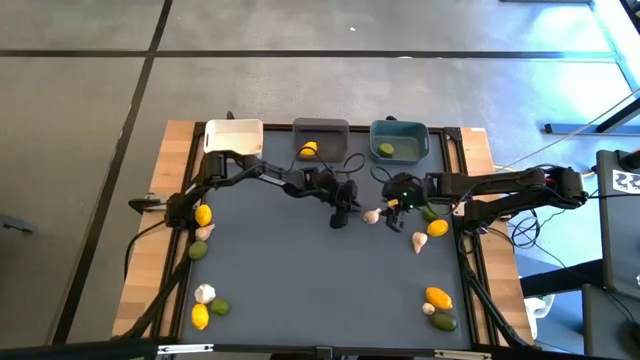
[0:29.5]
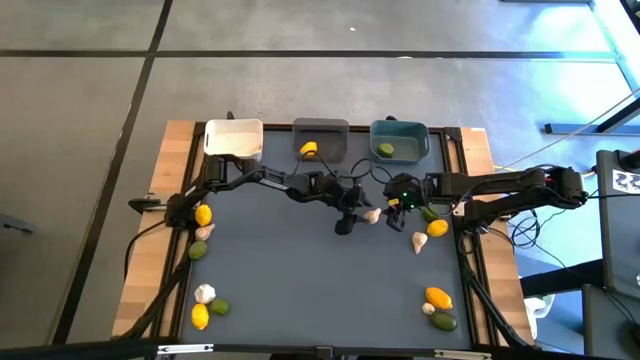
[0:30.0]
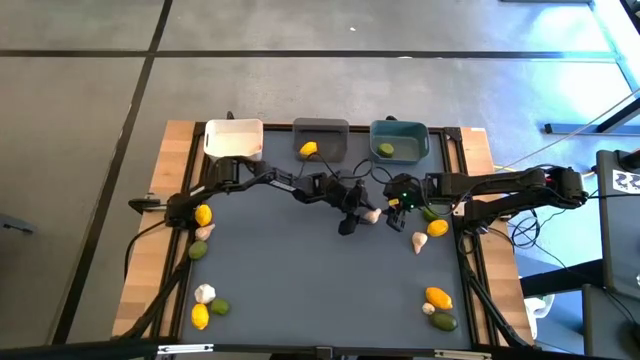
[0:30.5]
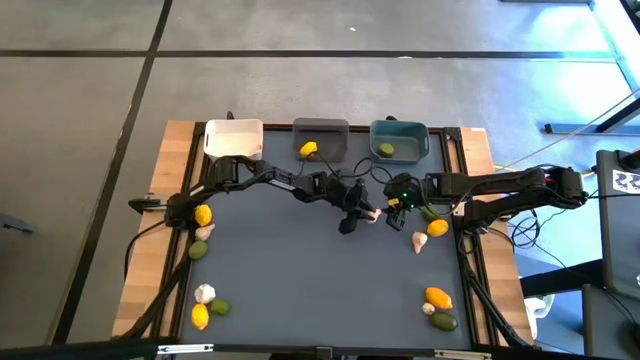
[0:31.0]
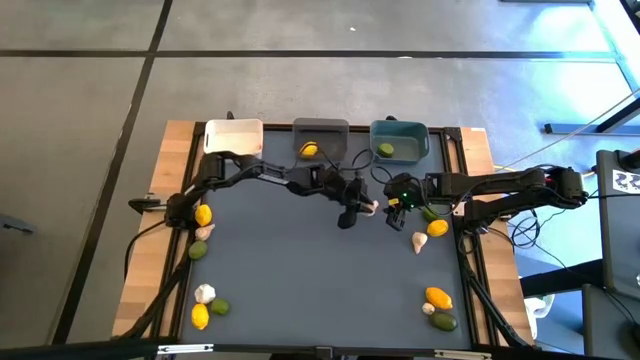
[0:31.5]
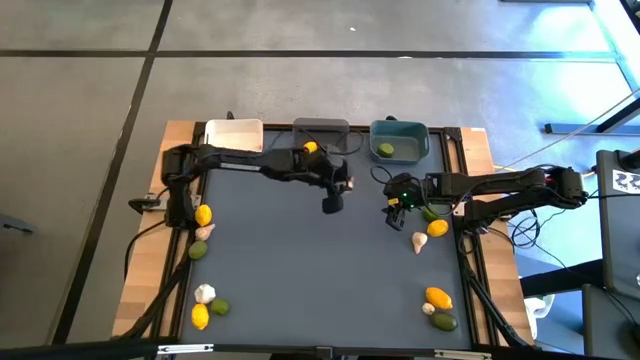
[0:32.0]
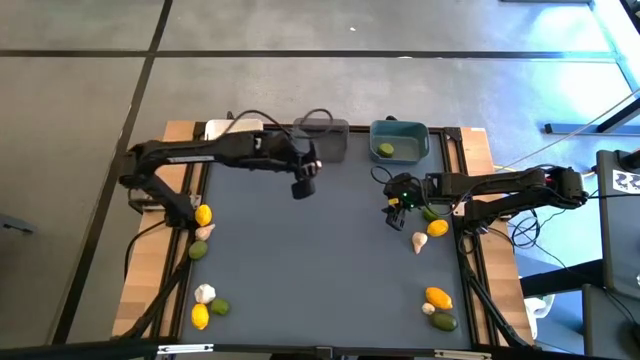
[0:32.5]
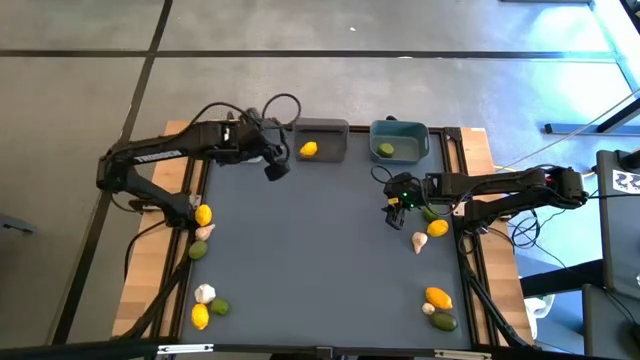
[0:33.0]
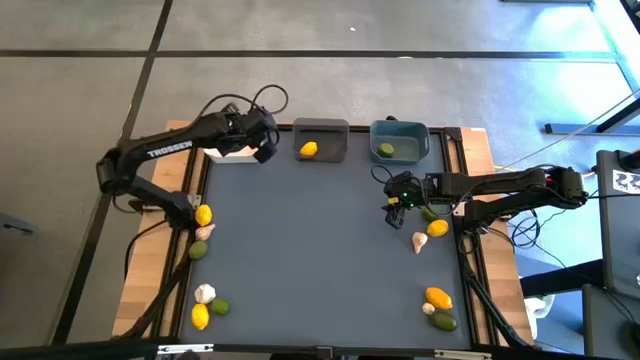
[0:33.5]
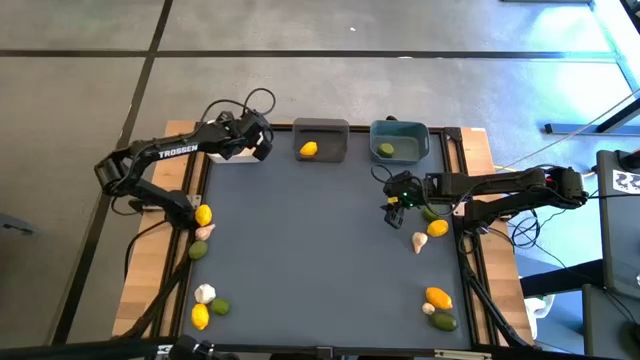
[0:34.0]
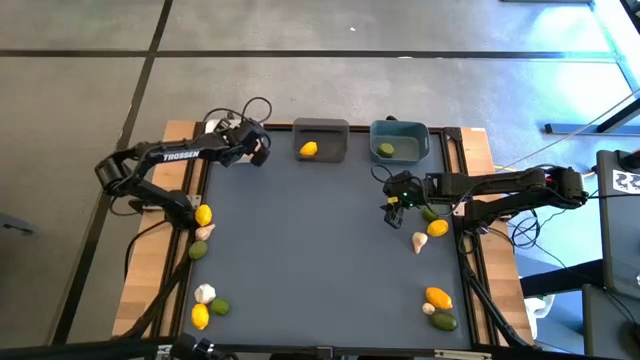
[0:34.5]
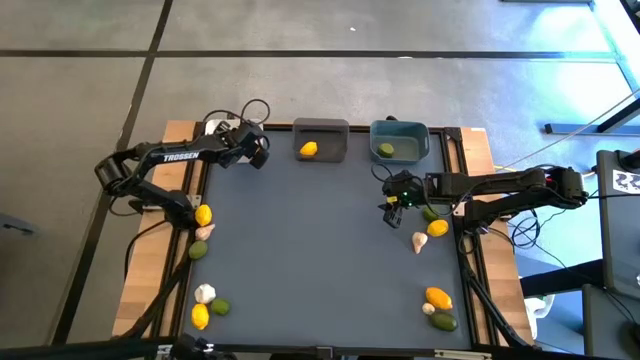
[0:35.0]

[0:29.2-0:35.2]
Task: Sort produce into baskets
Put the garlic into the white bin

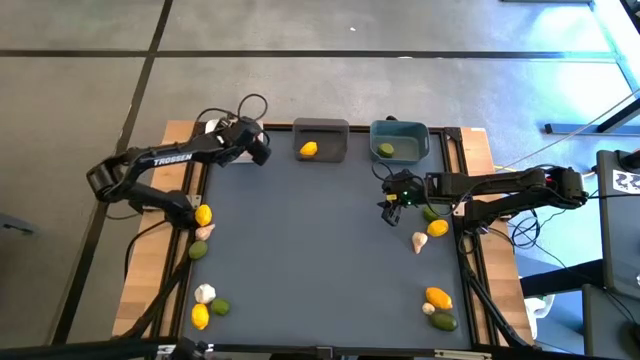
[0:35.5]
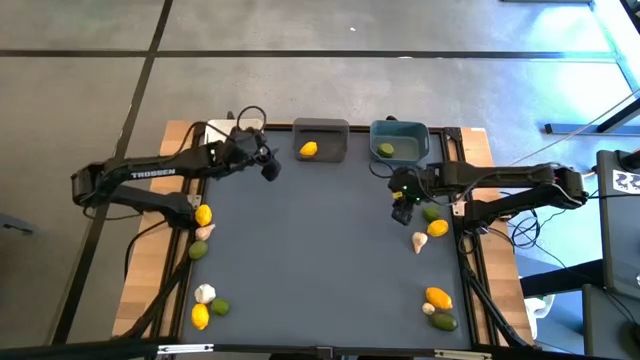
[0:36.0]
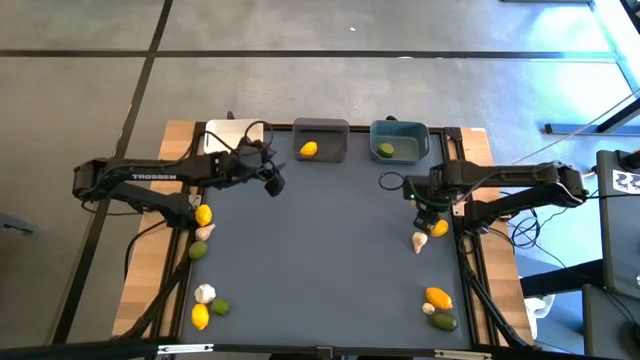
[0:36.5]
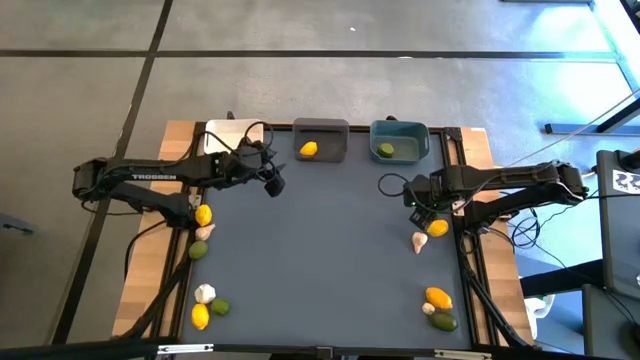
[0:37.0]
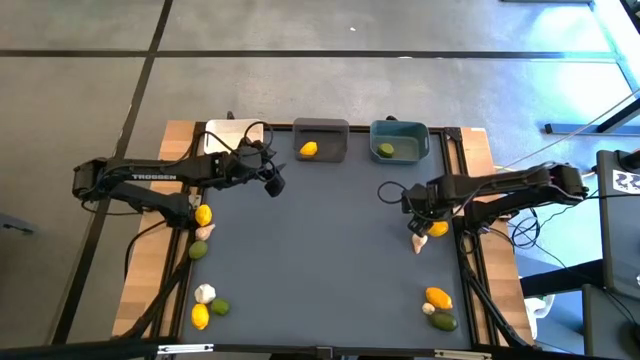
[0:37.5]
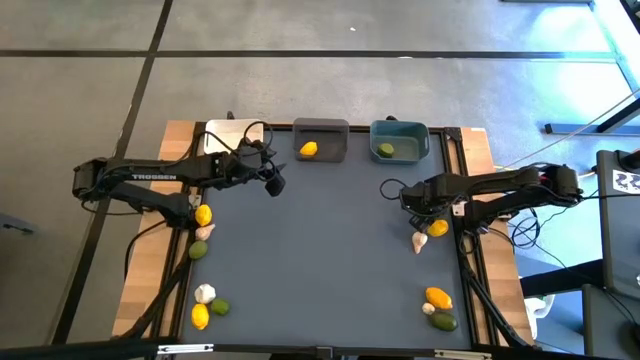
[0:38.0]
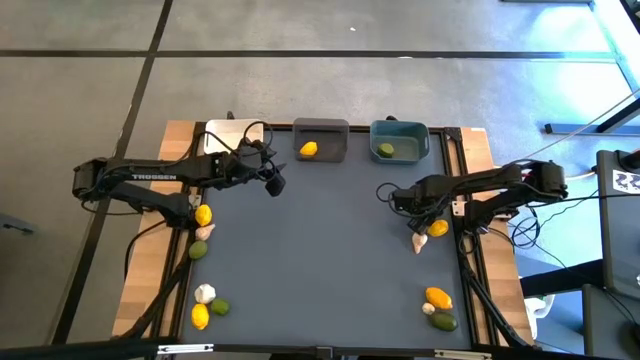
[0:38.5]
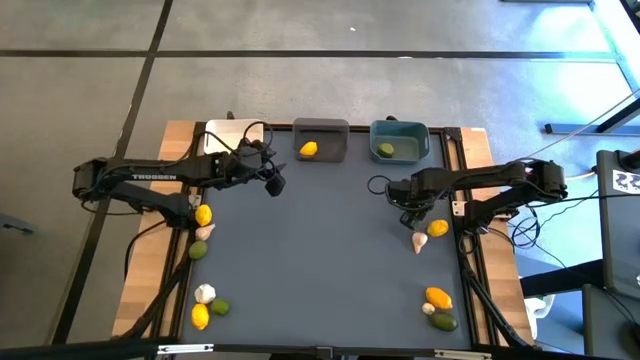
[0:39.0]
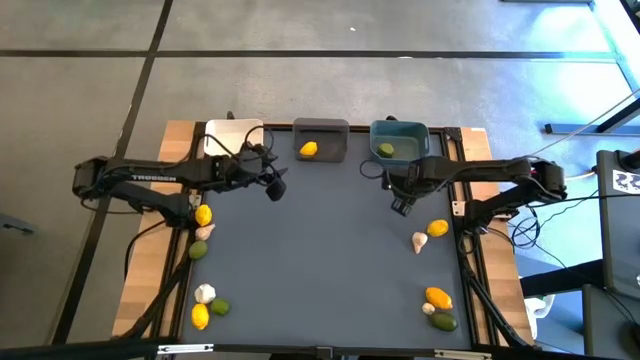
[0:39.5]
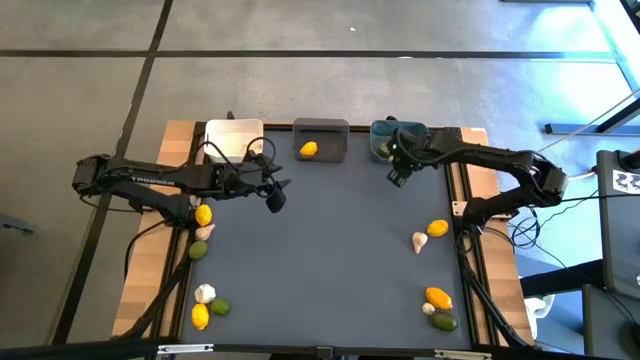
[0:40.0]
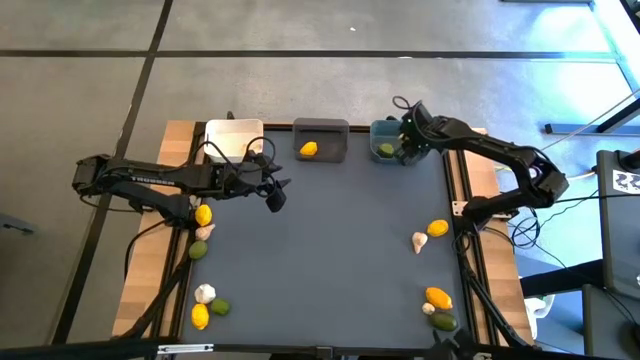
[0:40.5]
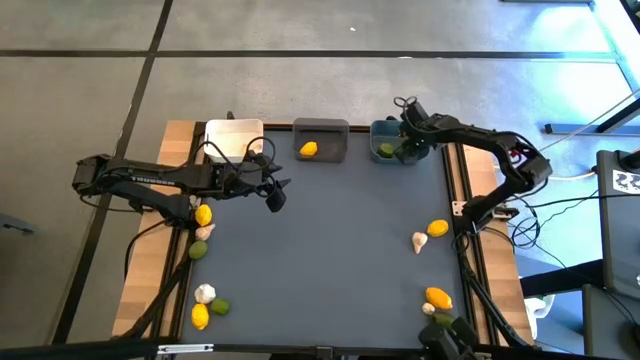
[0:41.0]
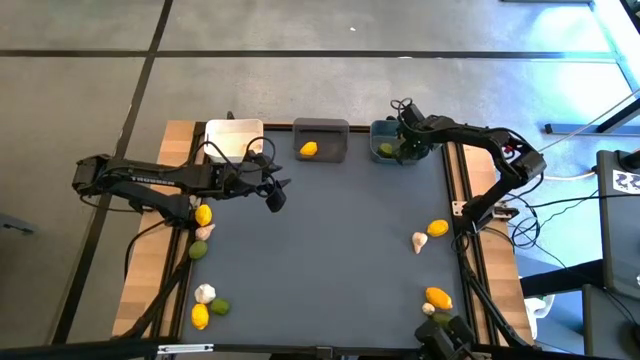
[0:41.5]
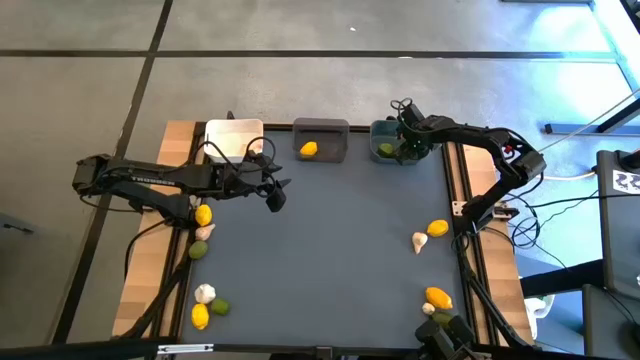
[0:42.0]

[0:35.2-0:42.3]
Put the lime into the blue bin

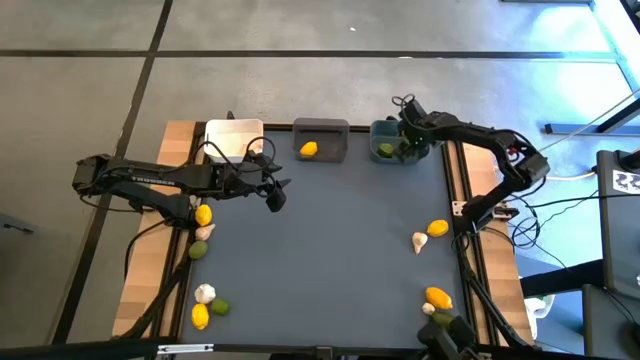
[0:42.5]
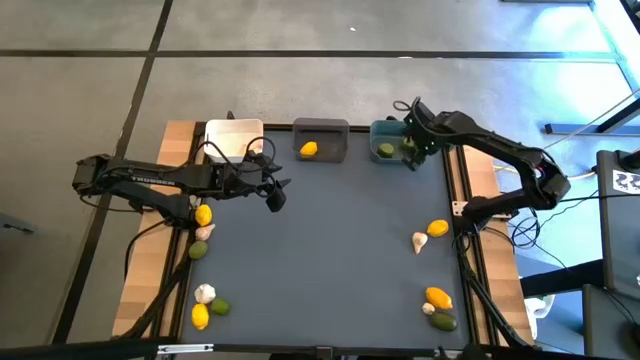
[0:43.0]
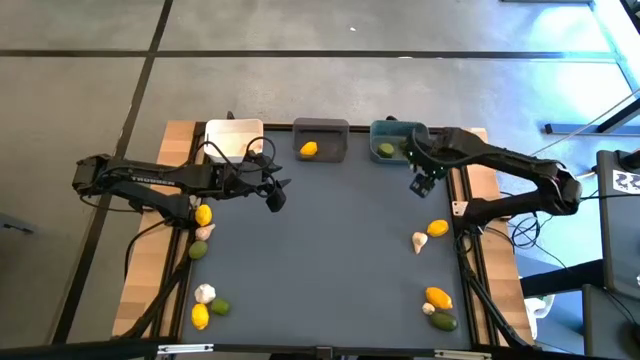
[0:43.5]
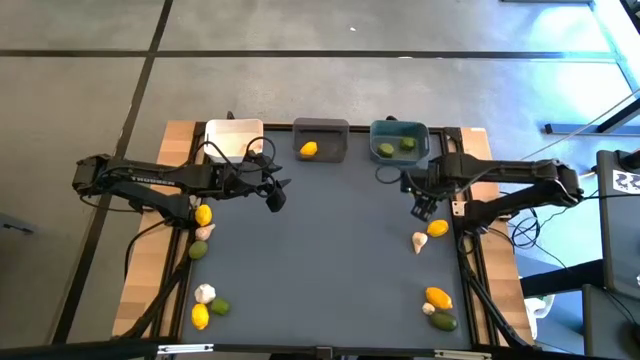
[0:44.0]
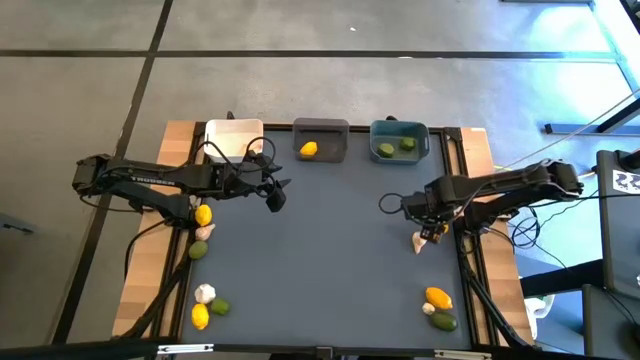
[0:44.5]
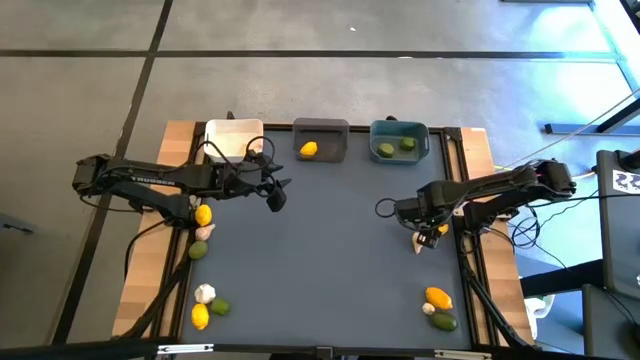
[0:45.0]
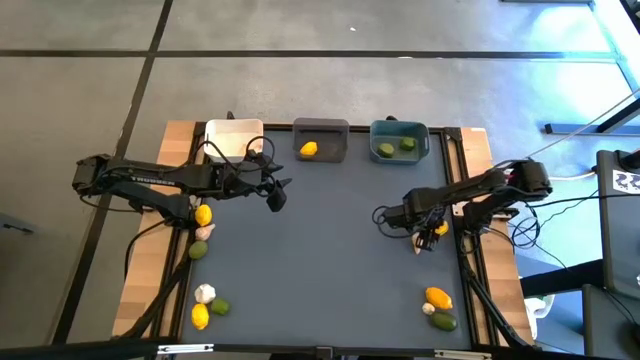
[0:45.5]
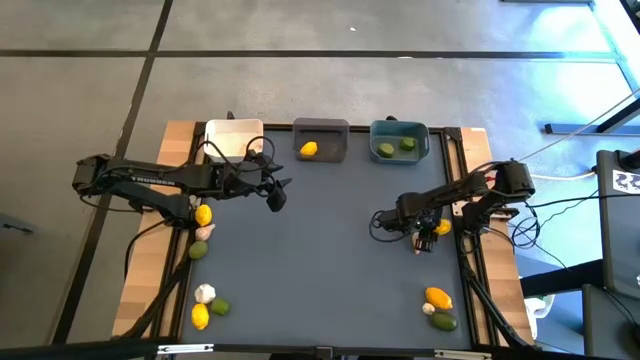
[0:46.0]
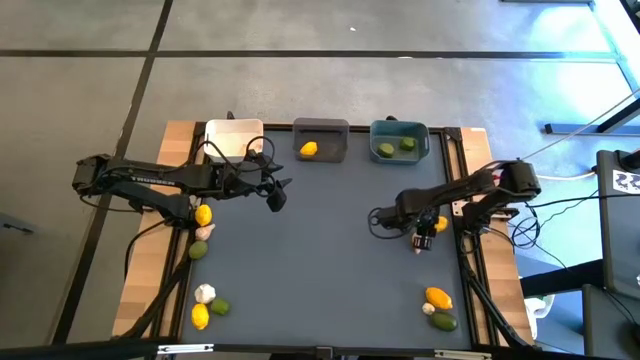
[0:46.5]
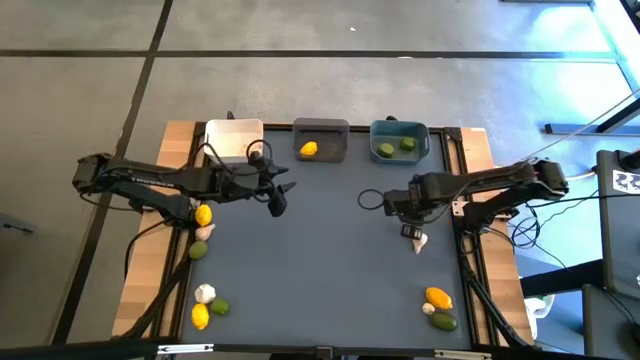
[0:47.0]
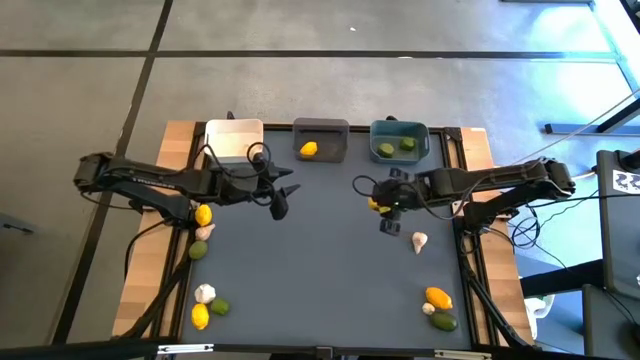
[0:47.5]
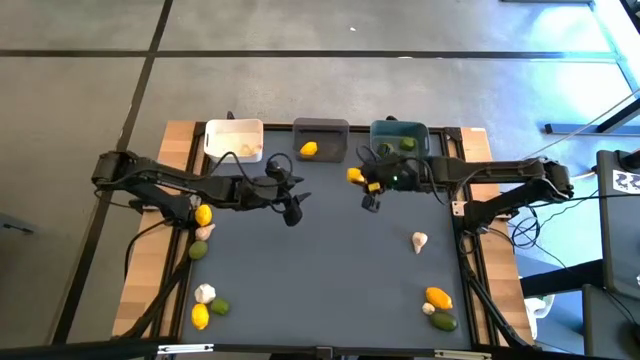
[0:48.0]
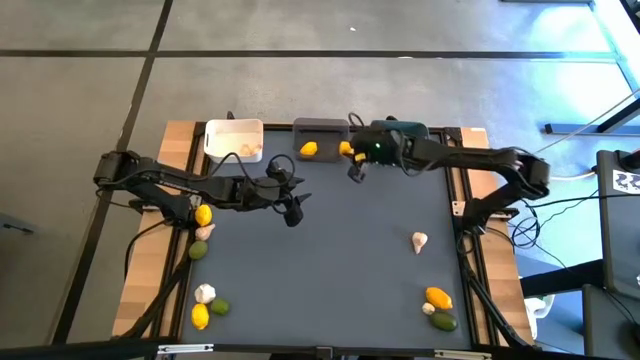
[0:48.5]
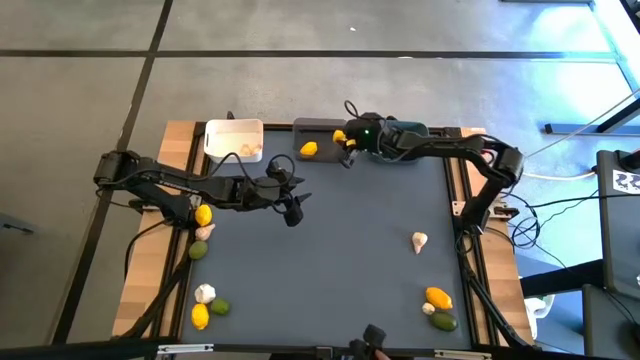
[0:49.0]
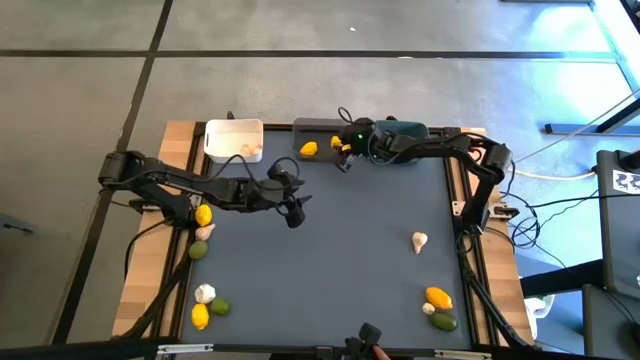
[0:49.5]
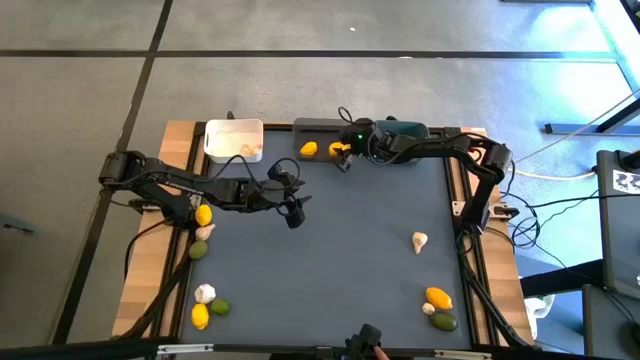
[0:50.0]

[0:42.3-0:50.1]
Put the lemon into the black bin
